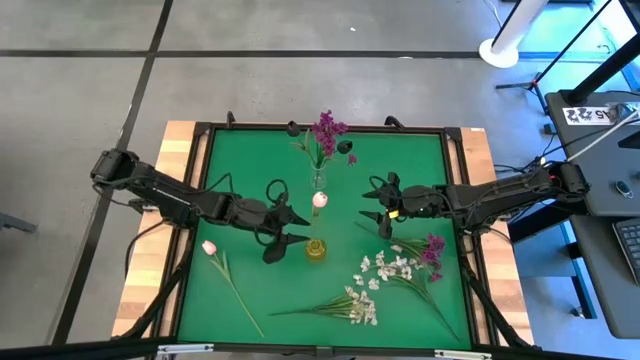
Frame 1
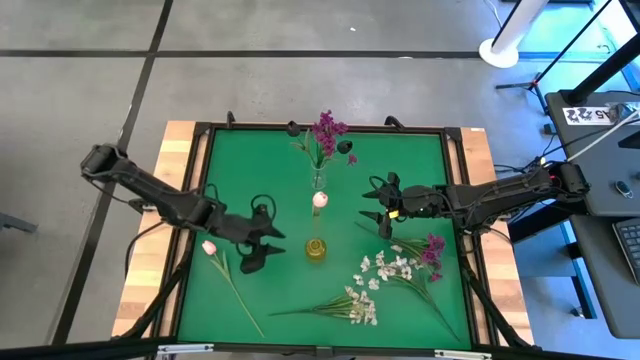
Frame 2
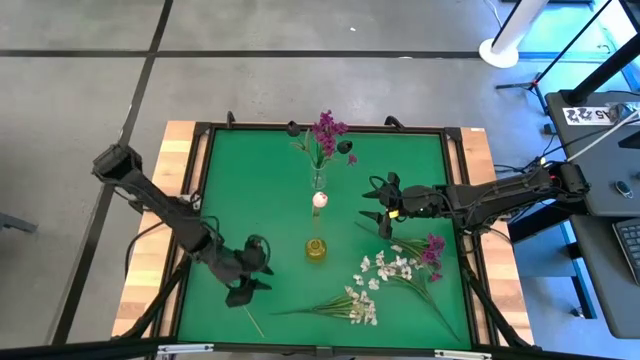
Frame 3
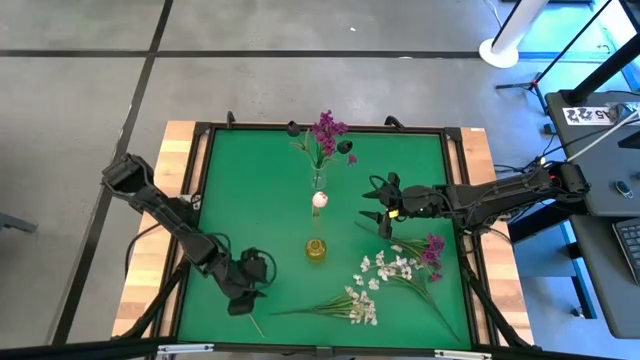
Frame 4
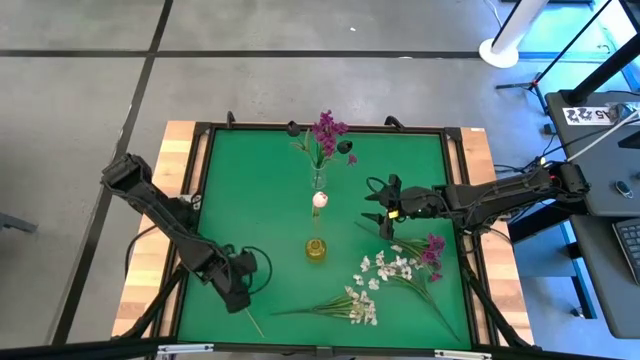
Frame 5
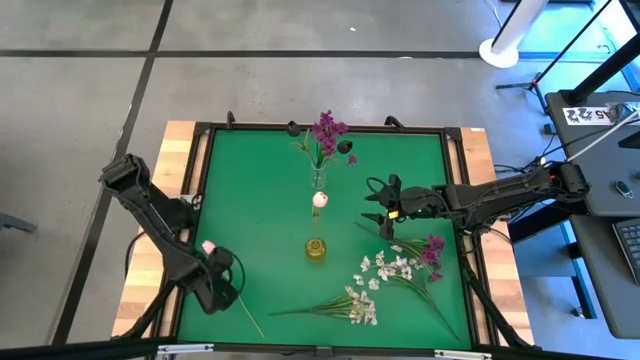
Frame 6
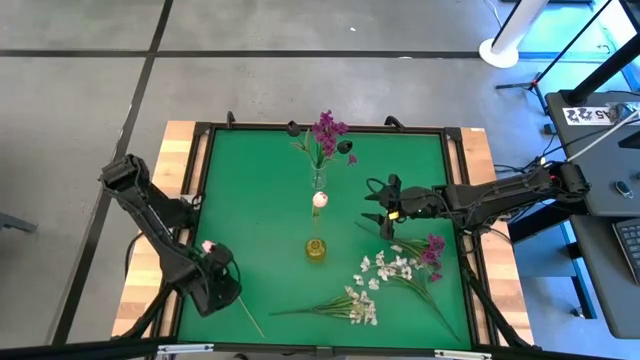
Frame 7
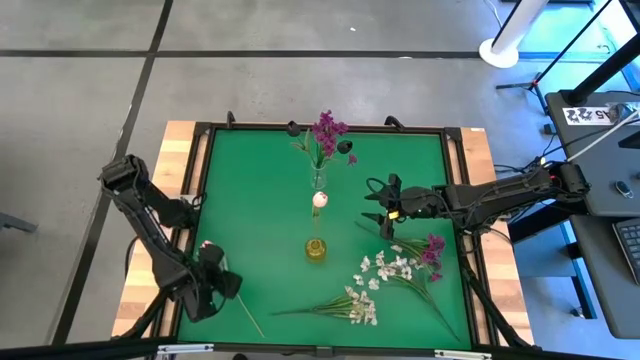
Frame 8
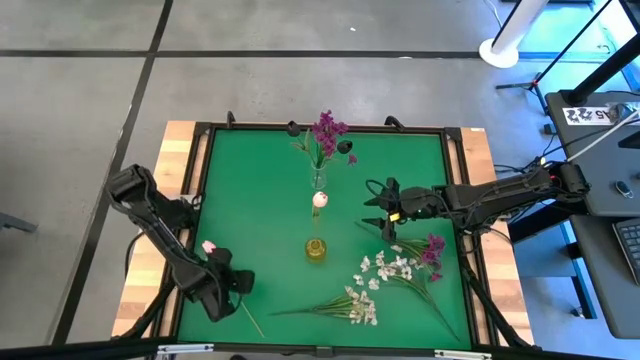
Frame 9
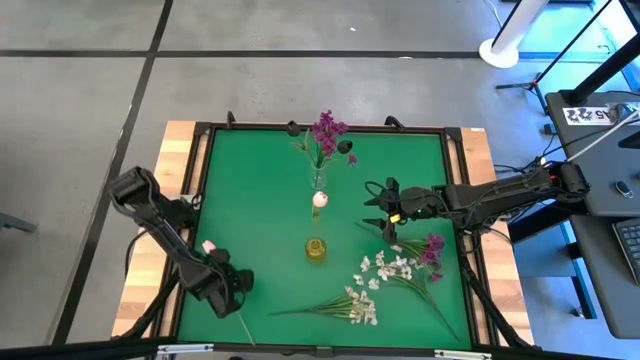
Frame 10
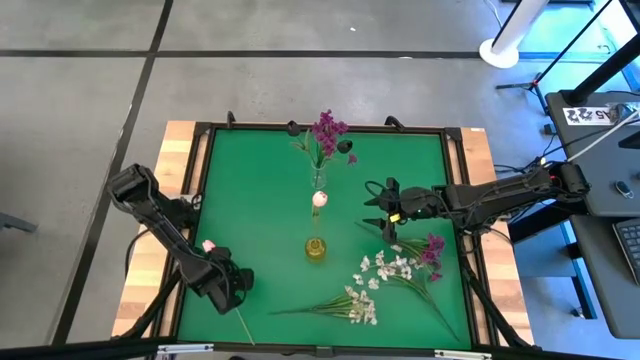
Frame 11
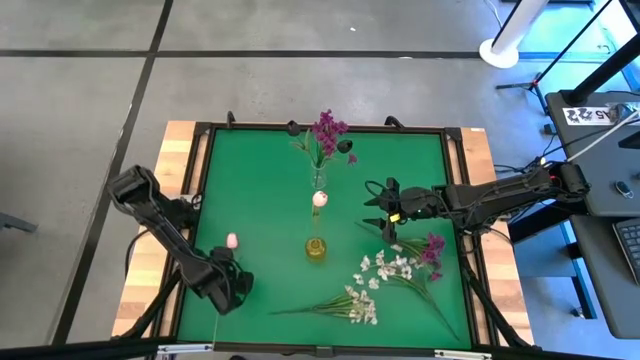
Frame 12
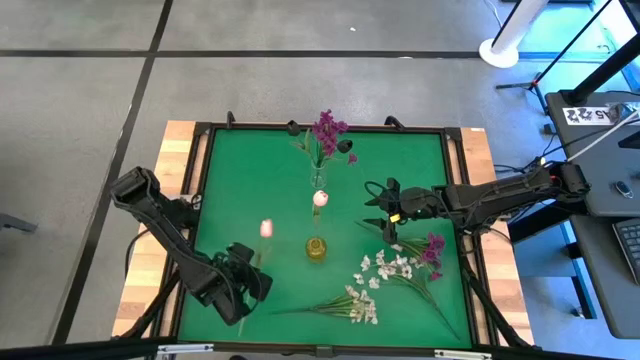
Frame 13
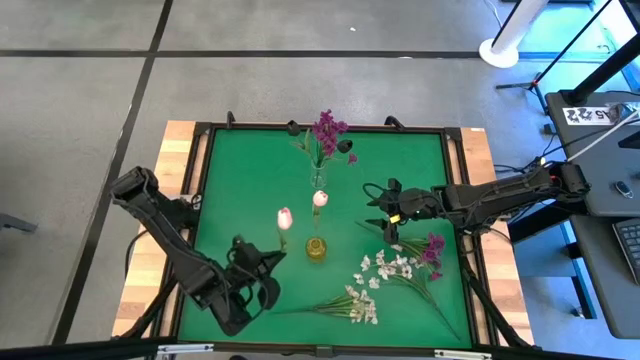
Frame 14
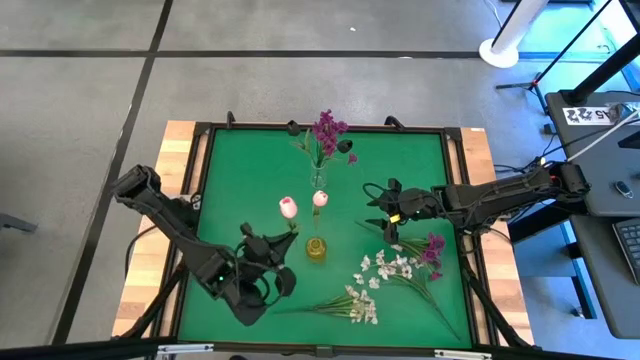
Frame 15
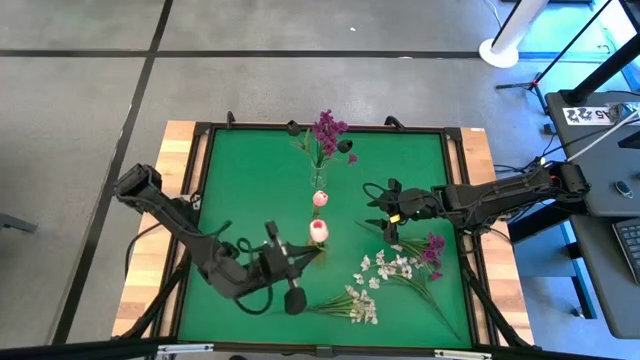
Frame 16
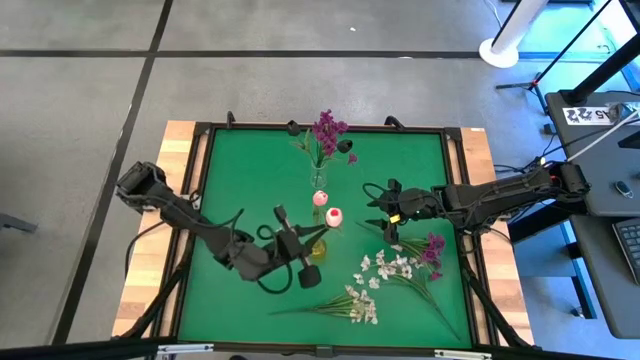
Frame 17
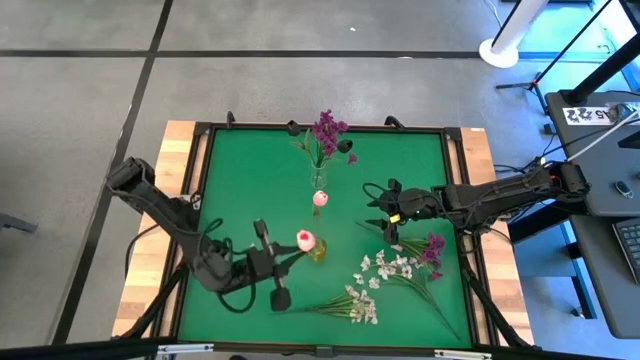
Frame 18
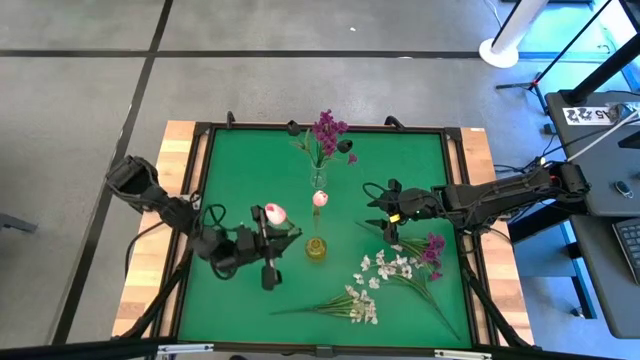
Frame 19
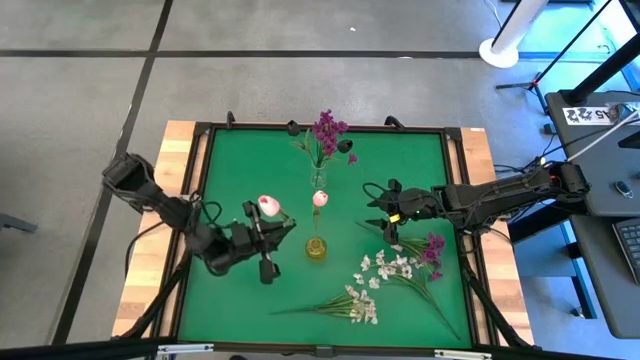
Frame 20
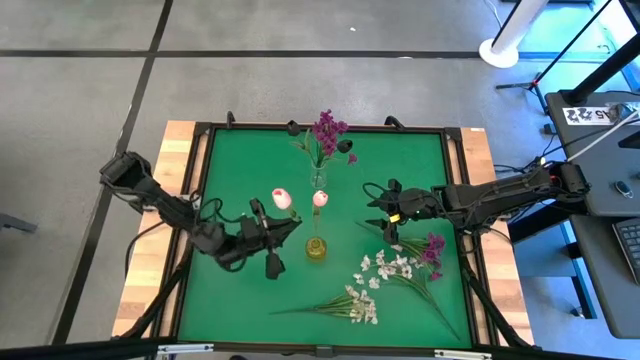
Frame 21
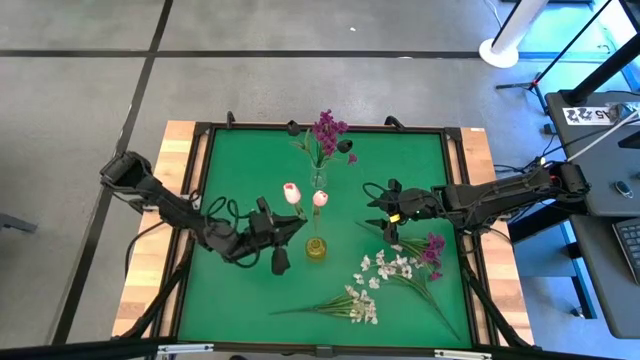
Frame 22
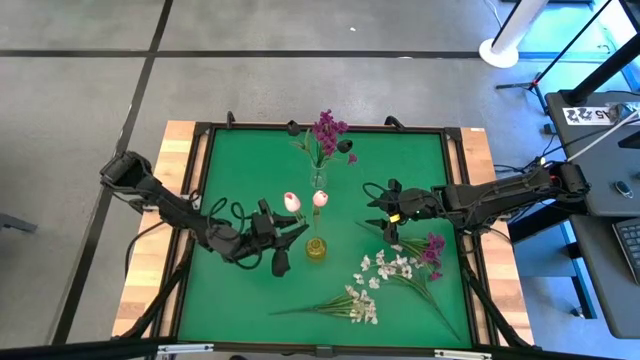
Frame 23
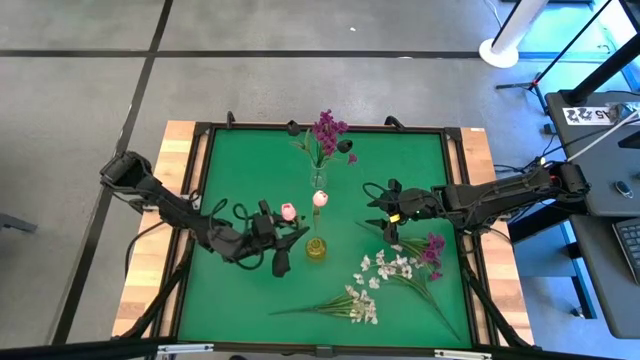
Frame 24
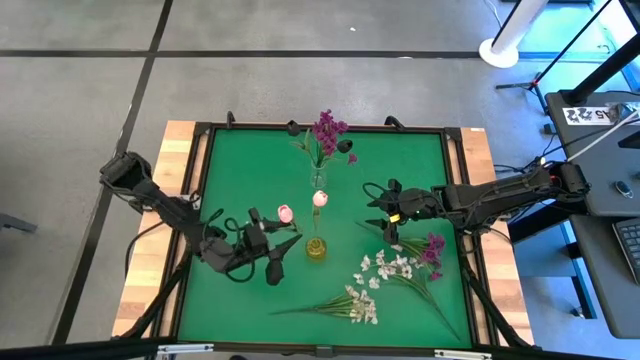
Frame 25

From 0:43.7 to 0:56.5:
Task: Sort flowers into vase by color
Put the pink tulip into the yellow vase

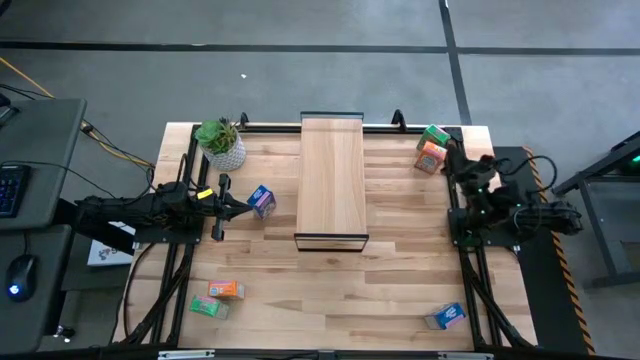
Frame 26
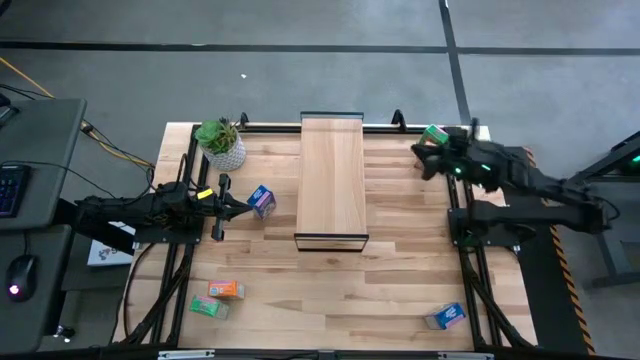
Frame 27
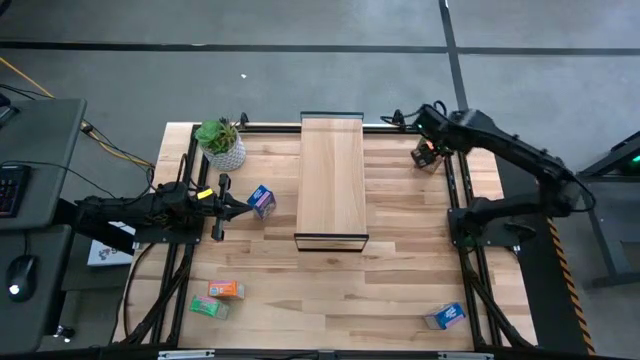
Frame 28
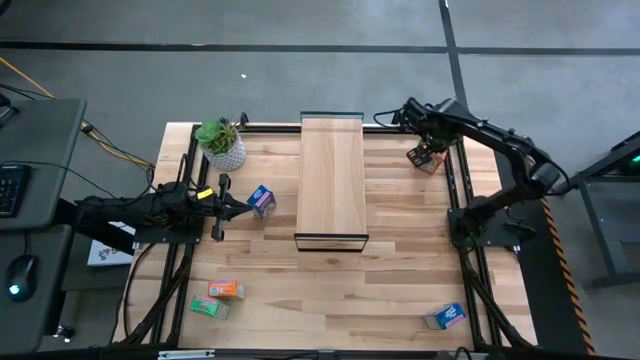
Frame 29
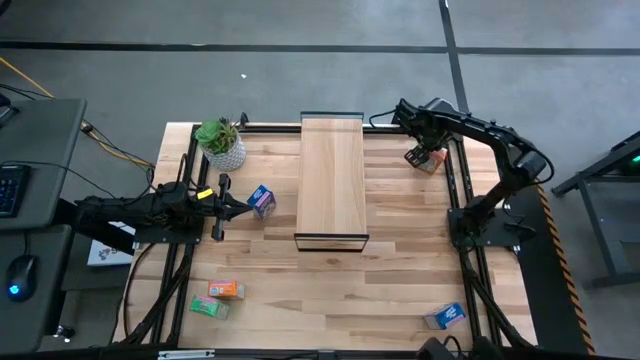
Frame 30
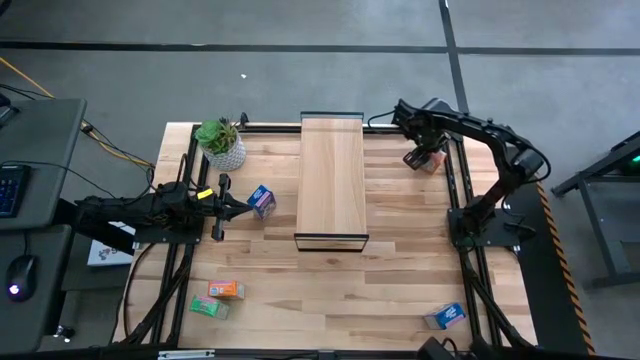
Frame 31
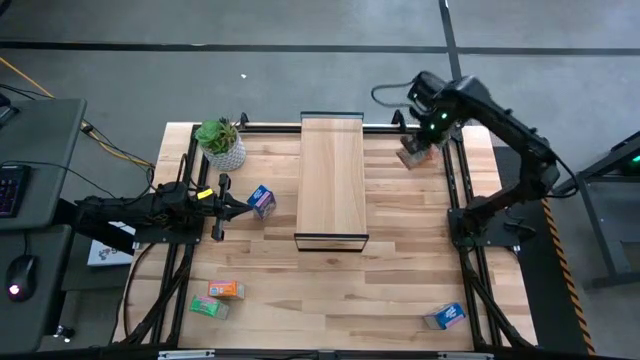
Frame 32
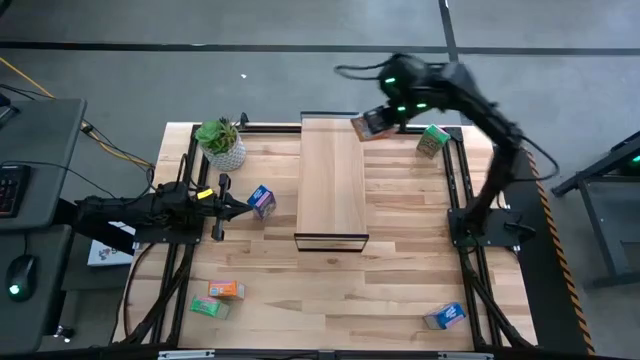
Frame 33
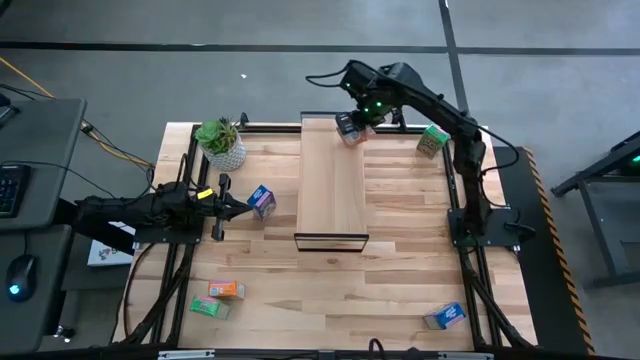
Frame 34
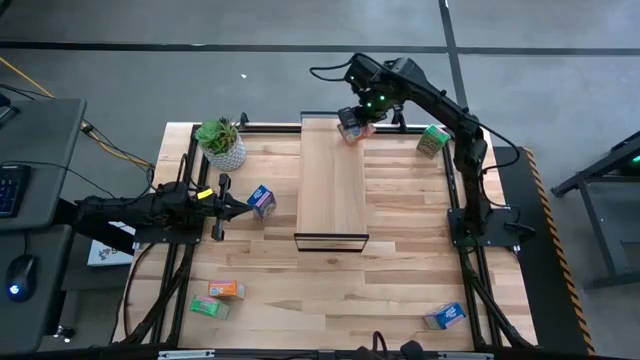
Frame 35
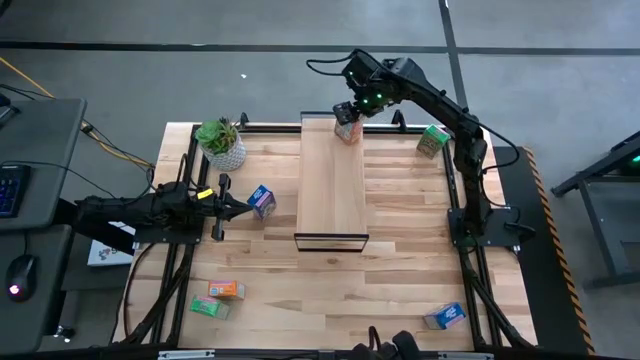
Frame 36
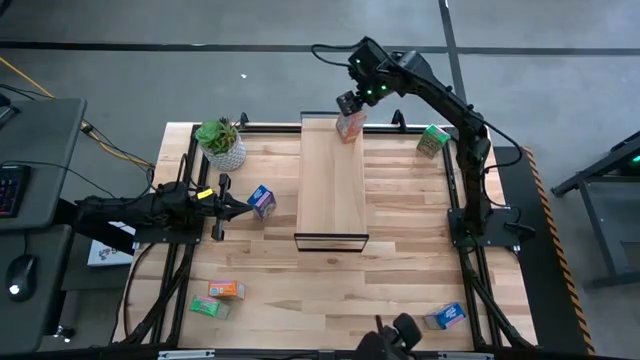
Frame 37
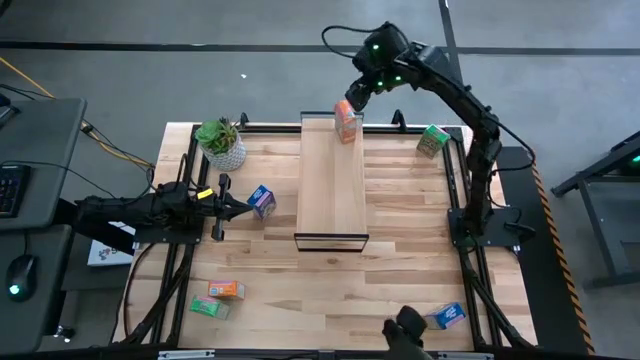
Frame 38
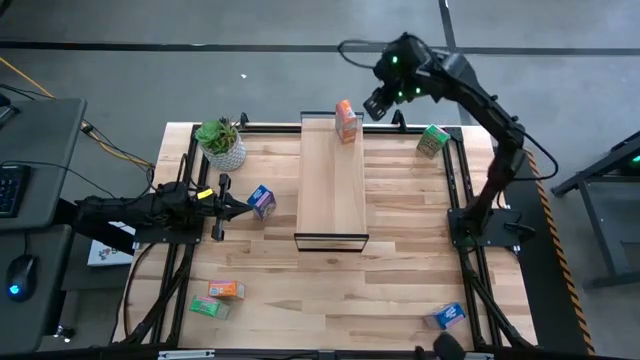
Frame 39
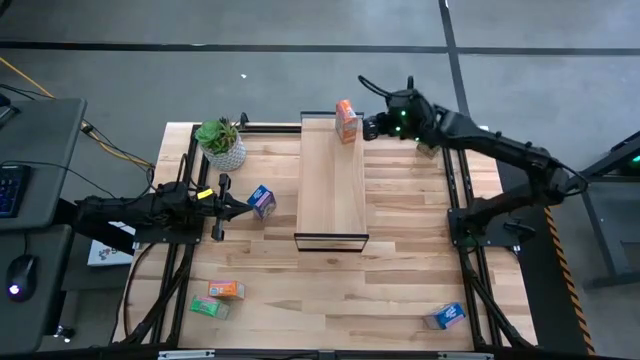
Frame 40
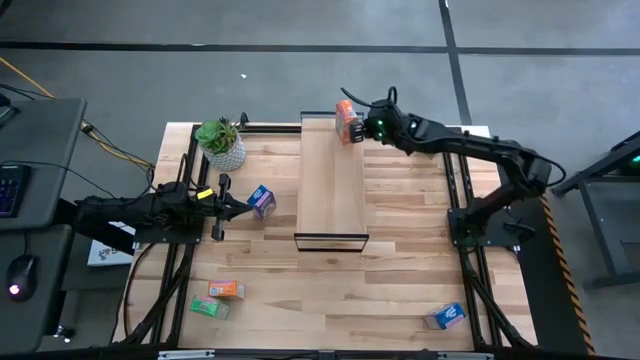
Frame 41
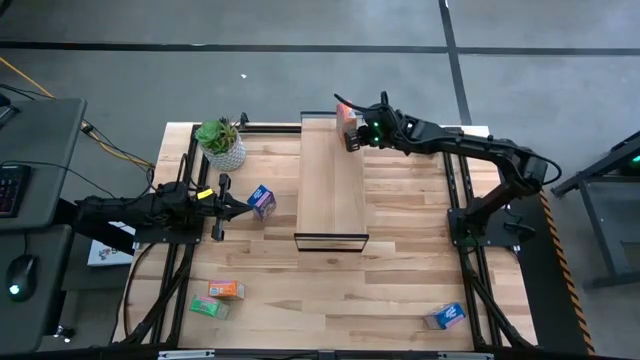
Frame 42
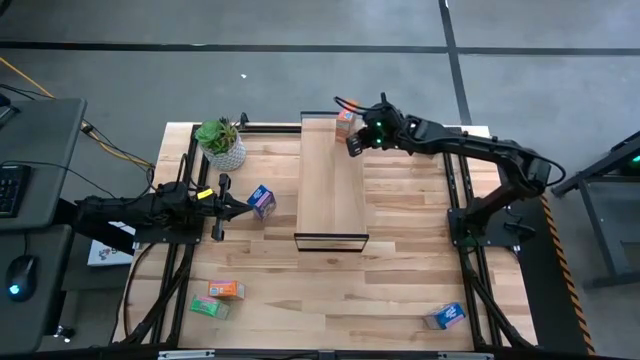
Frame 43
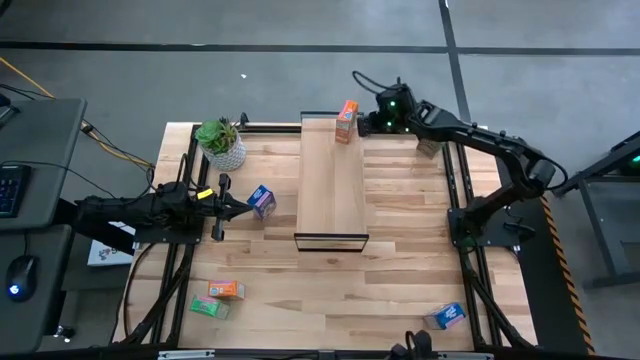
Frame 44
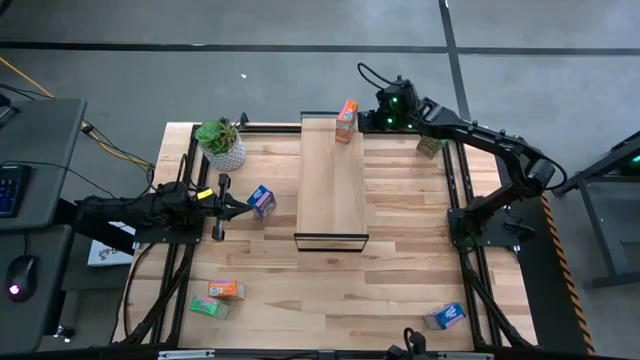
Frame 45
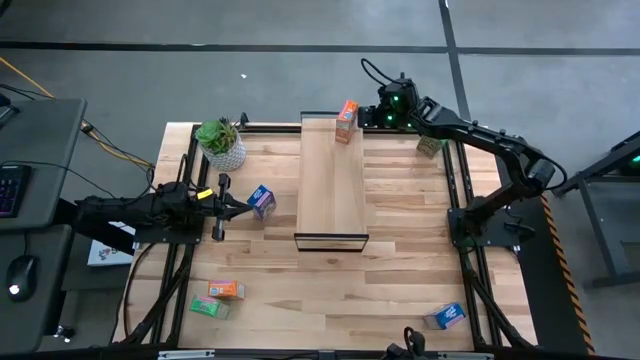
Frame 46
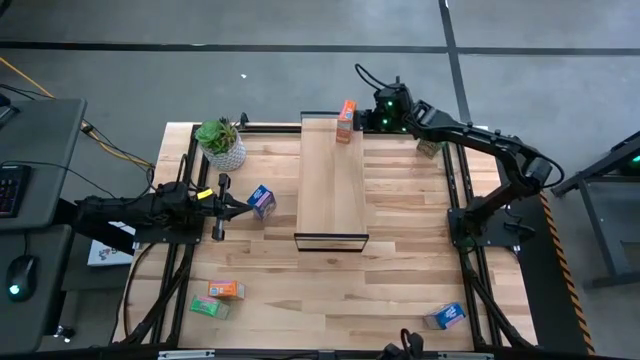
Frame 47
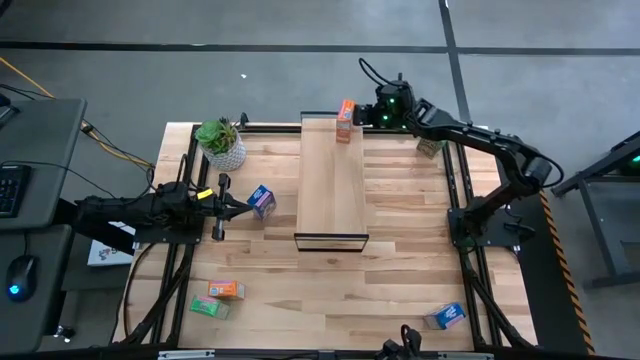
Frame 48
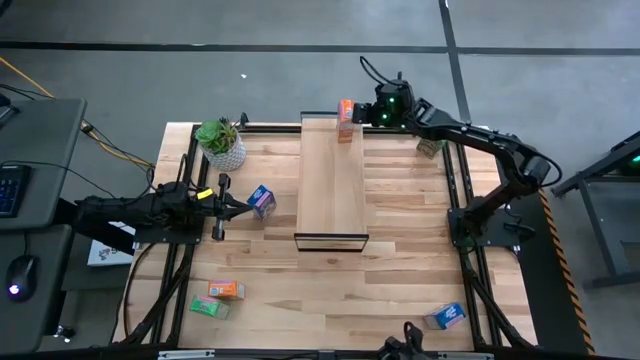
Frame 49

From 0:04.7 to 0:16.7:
Task: Stack cereal on shelf
Put the top orange cereal box on the shelf
